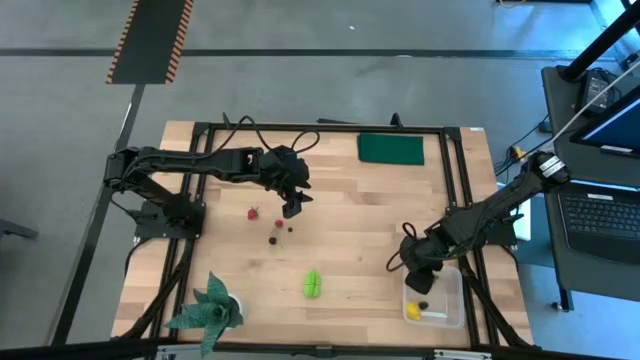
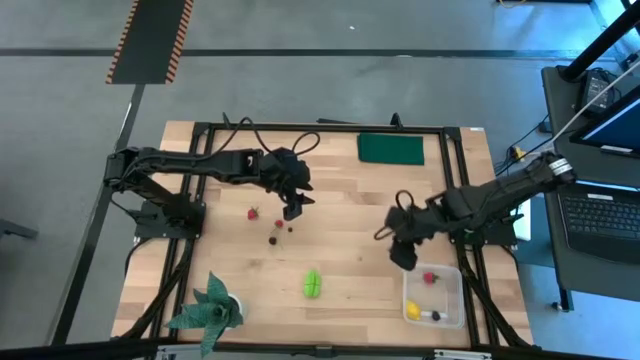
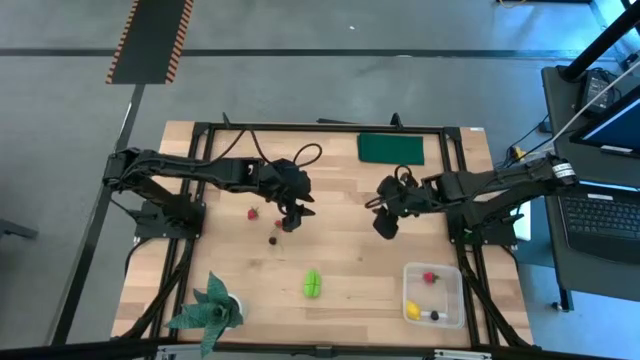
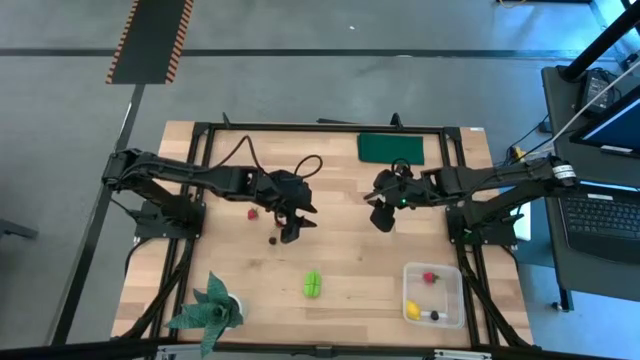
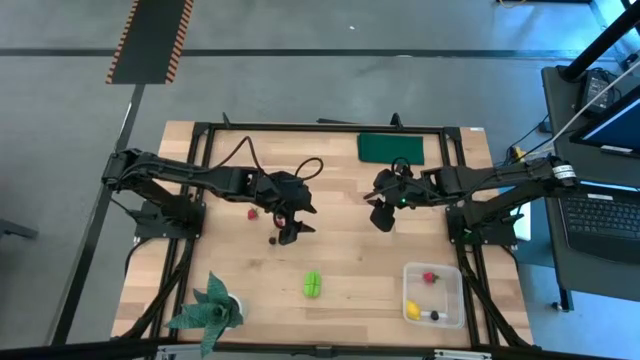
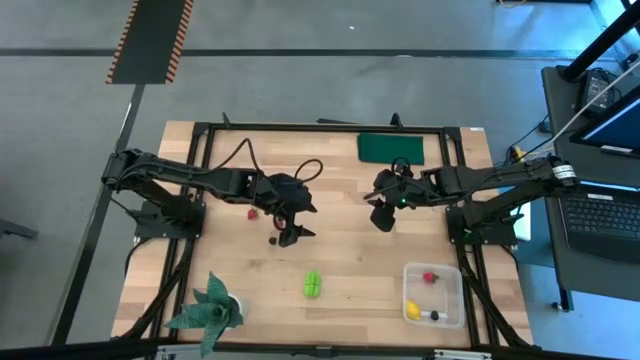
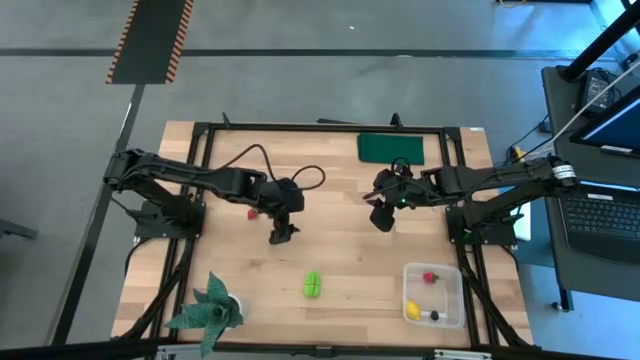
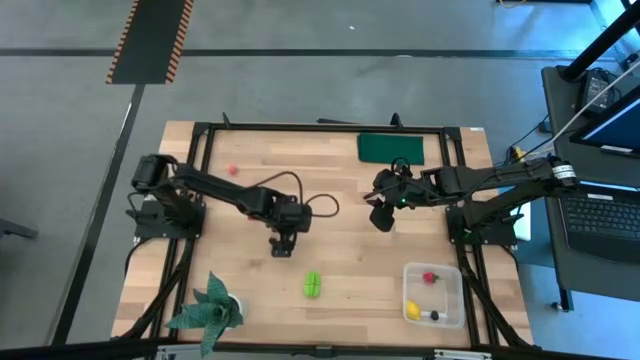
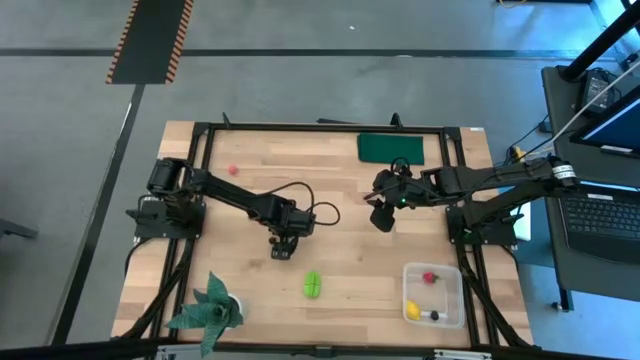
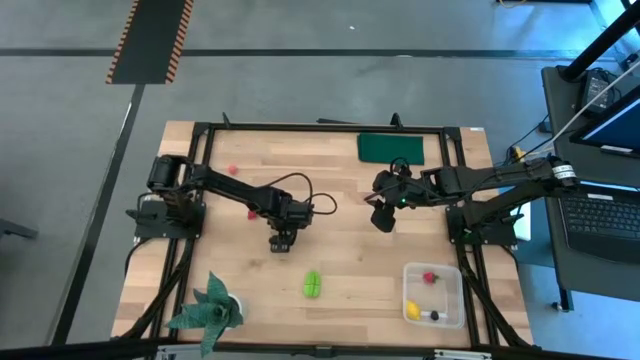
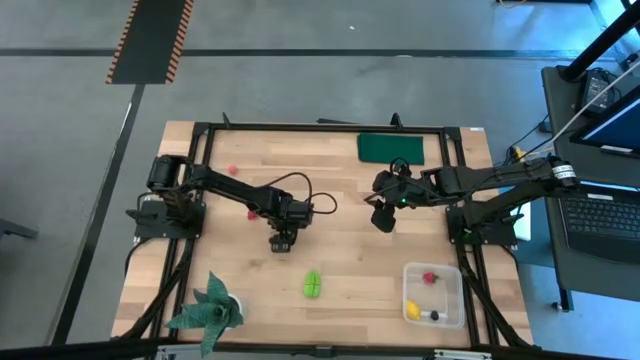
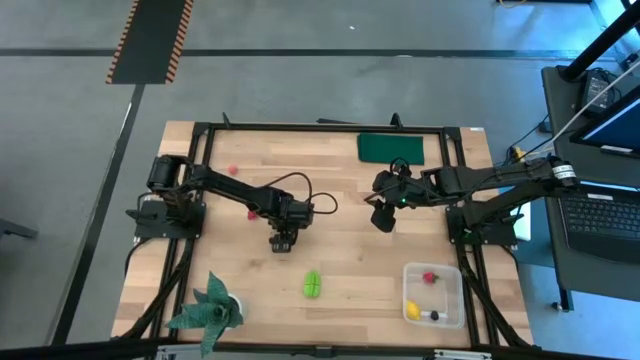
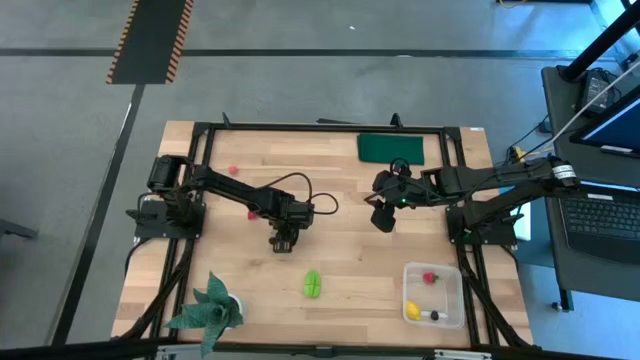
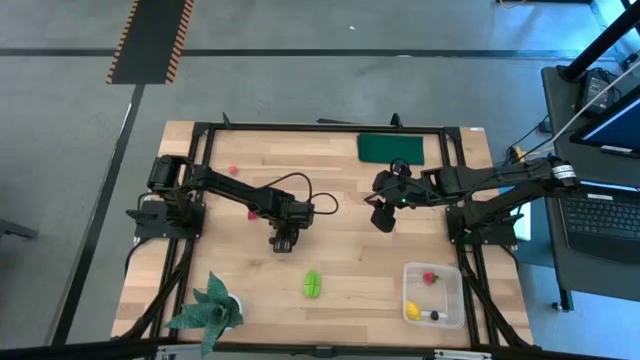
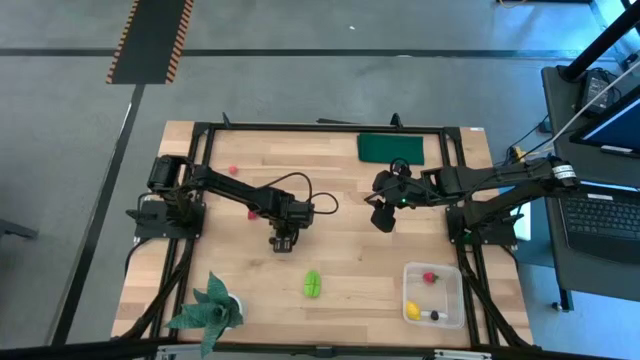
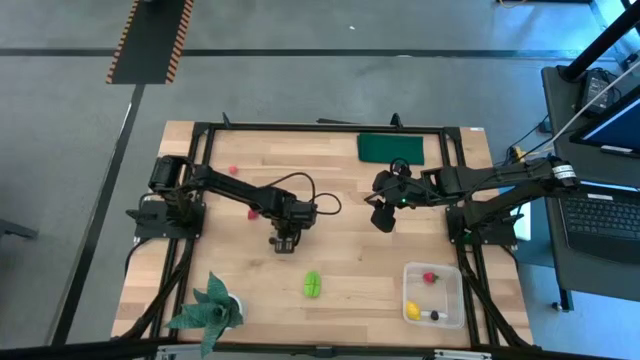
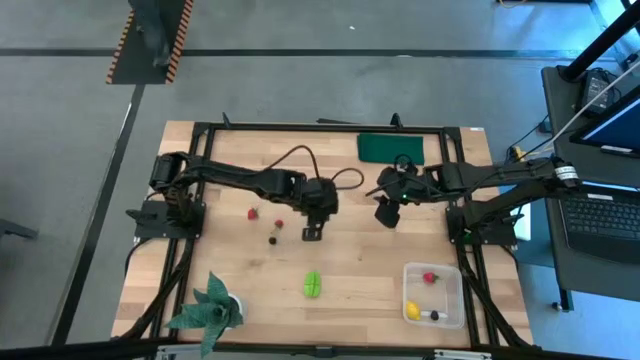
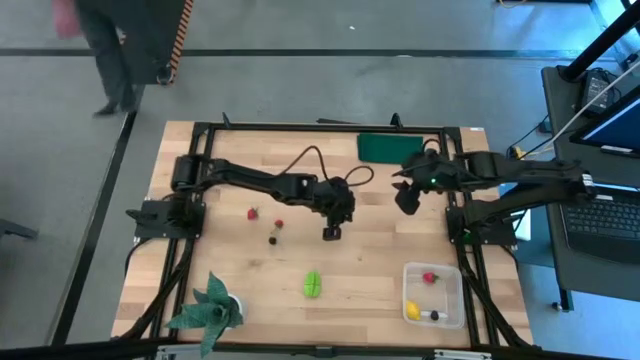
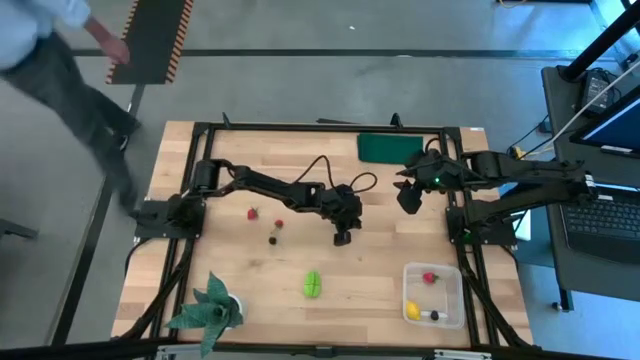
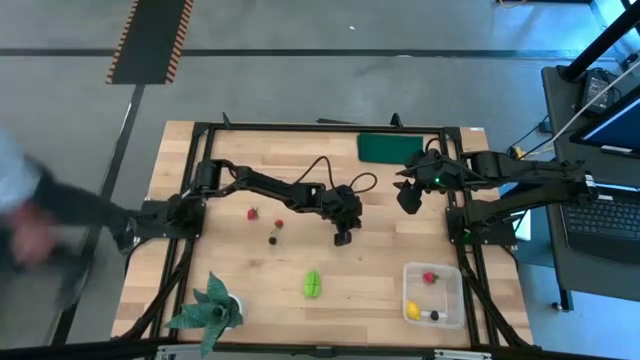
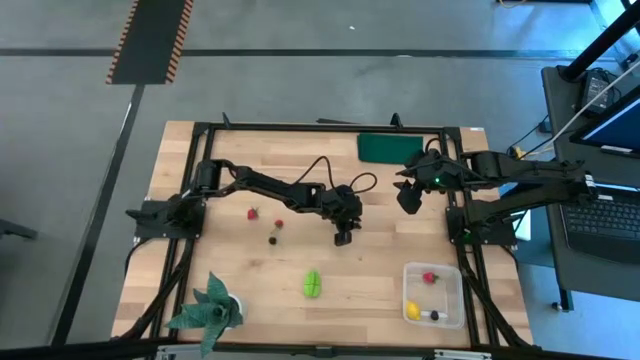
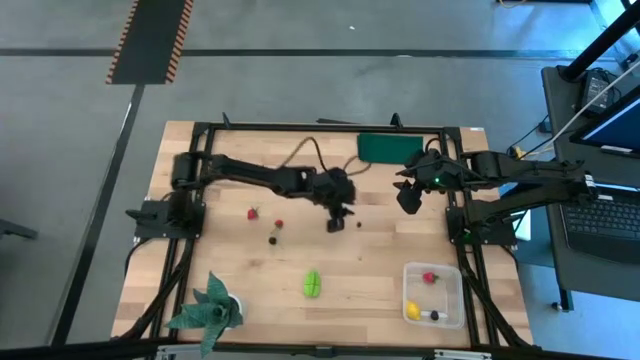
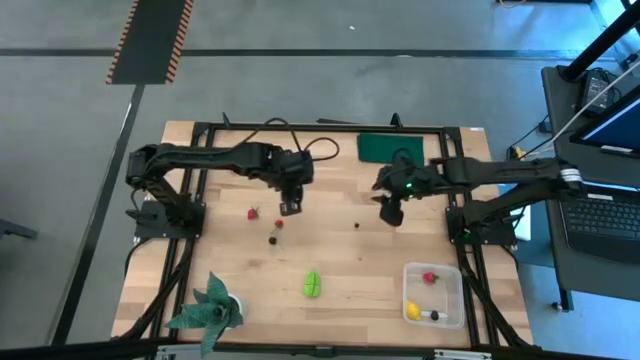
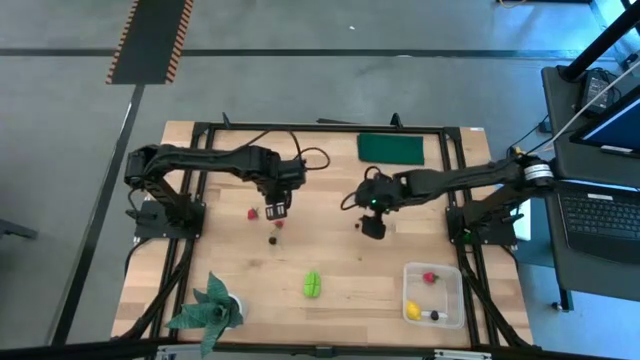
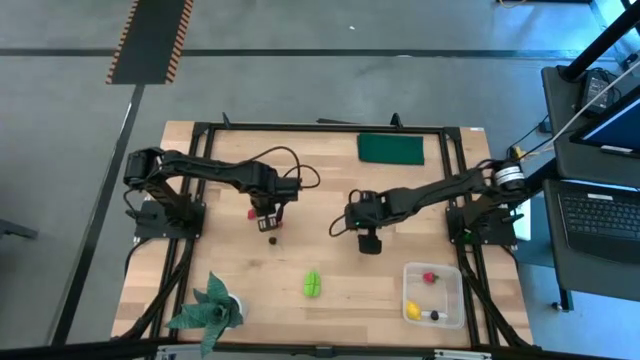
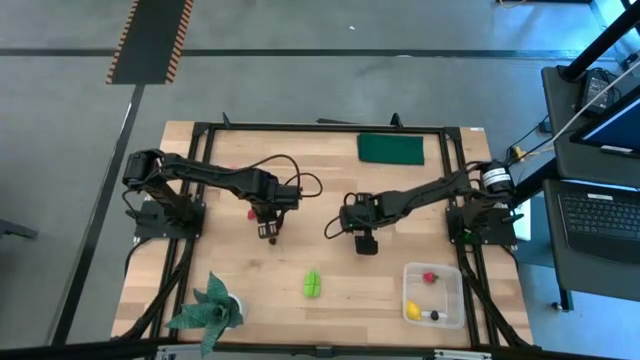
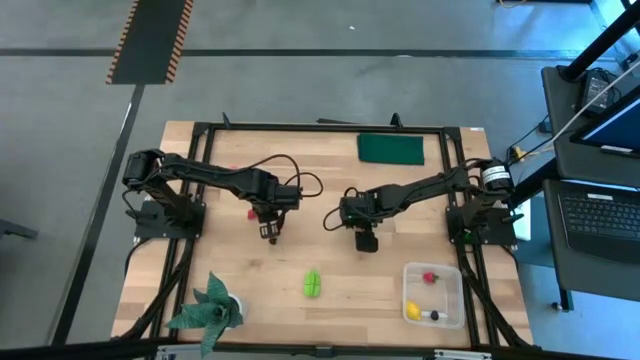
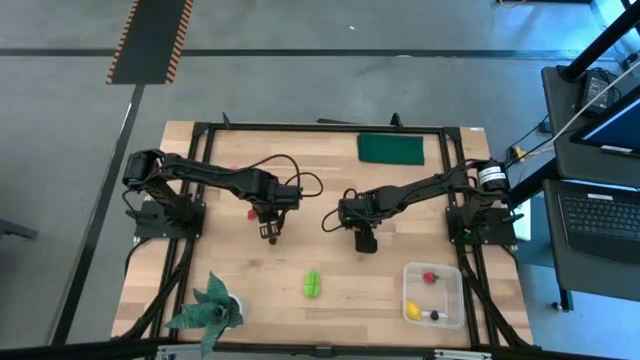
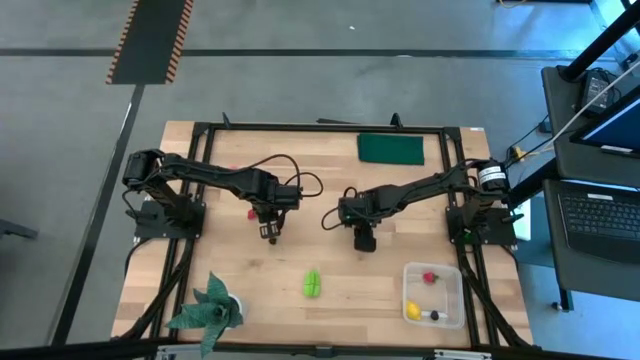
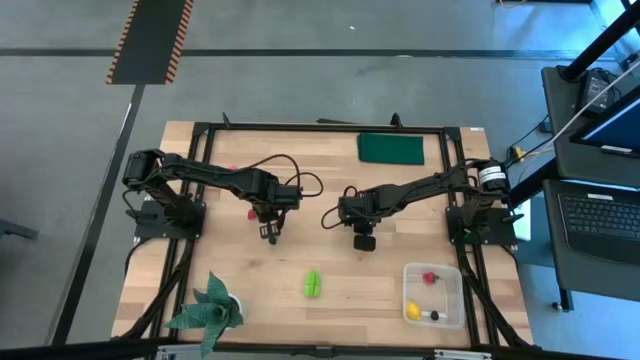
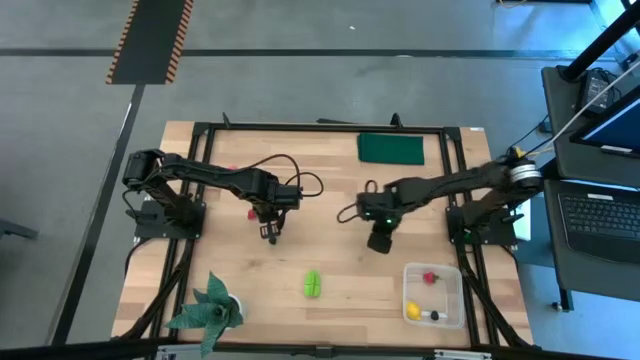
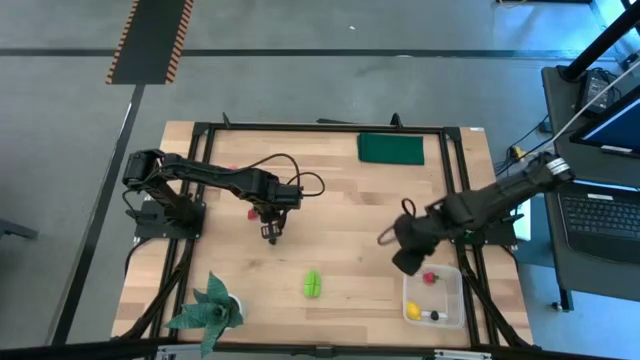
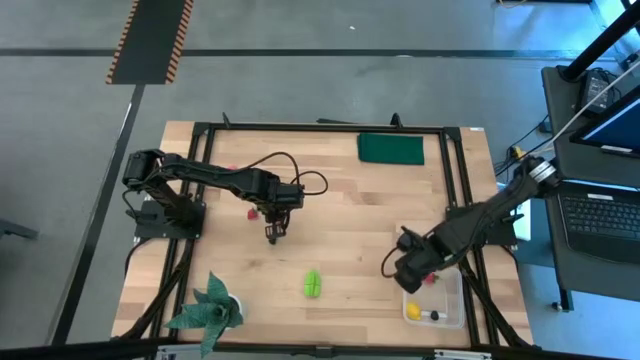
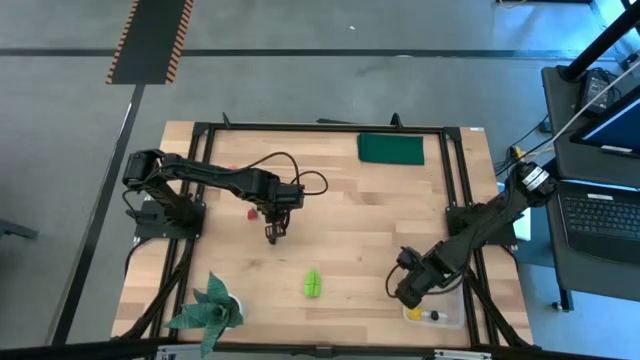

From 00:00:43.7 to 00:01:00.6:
Task: Pick and placing Produce into tupperware
Put the blueberry into the transparent bin

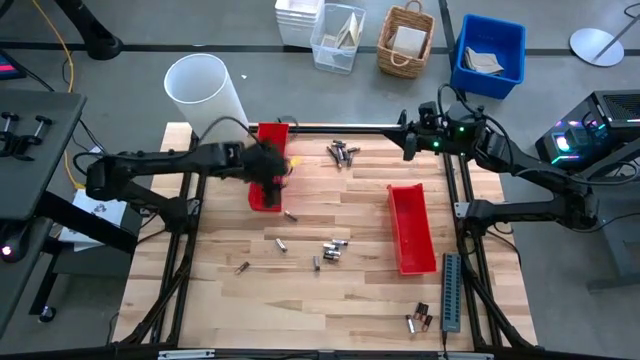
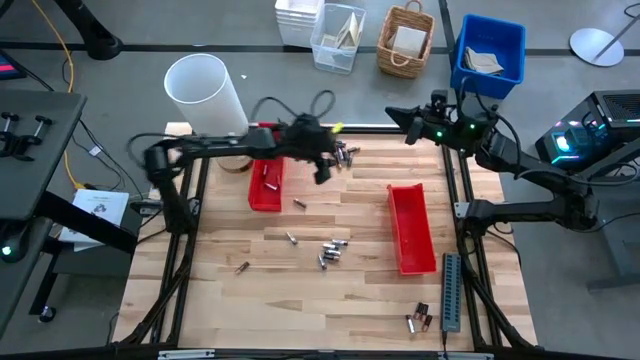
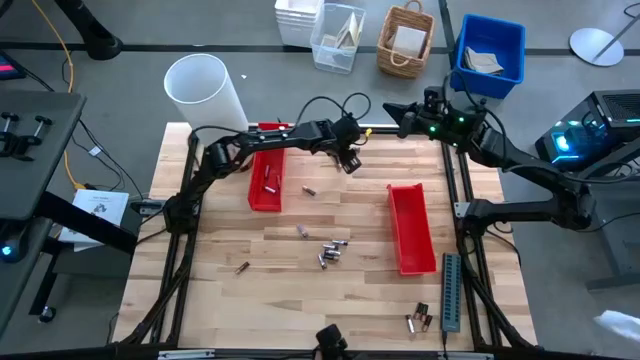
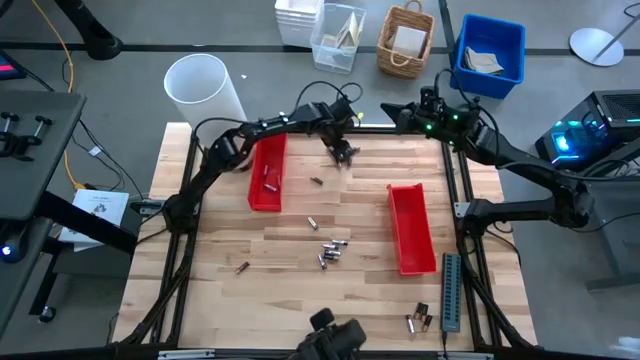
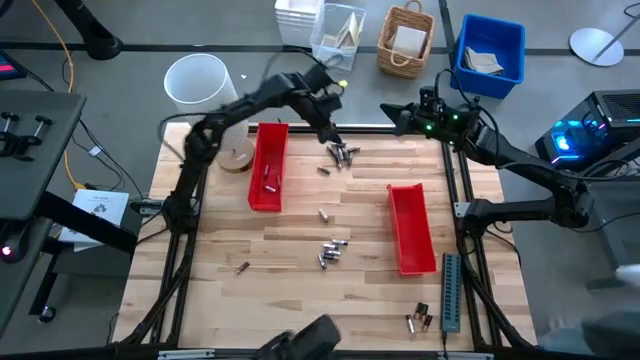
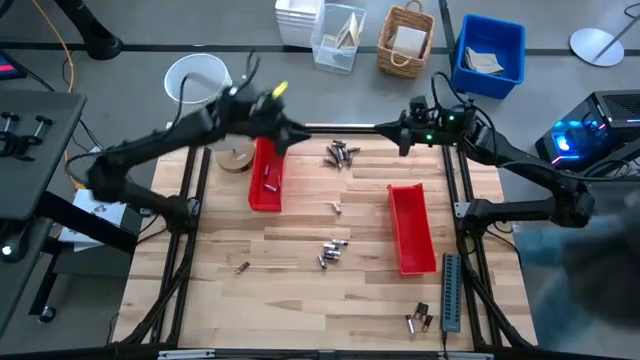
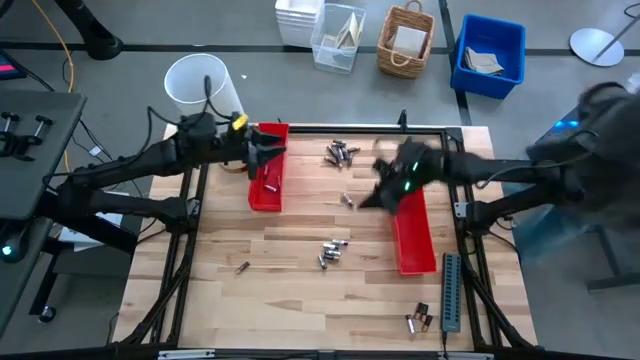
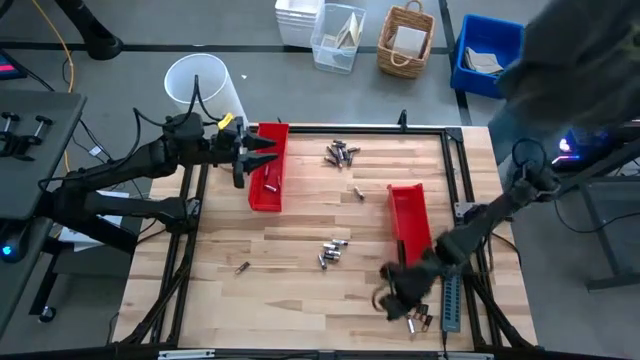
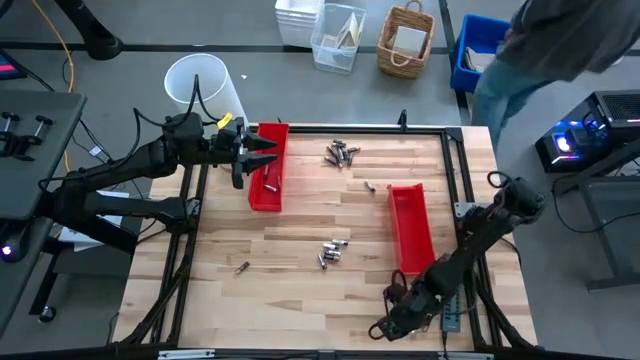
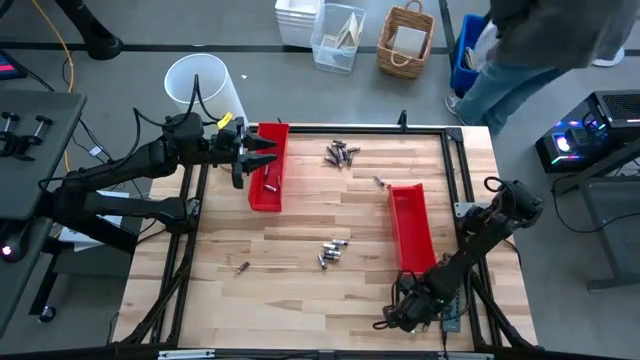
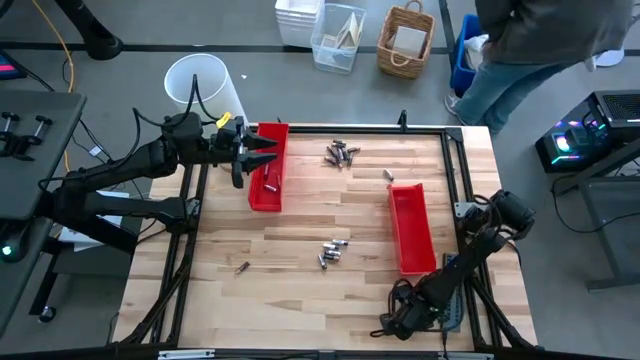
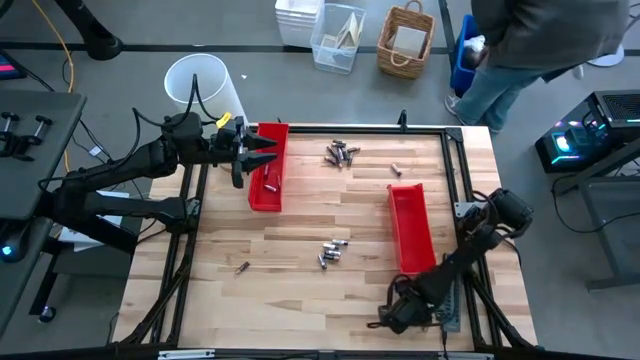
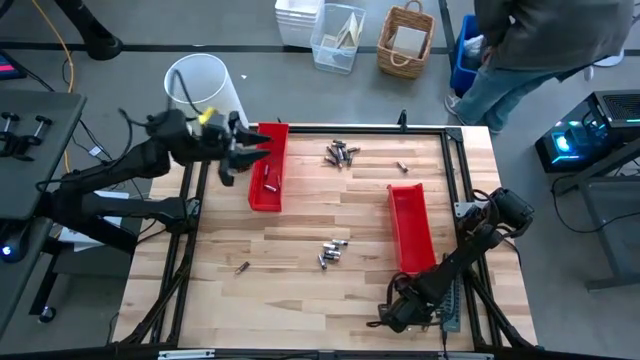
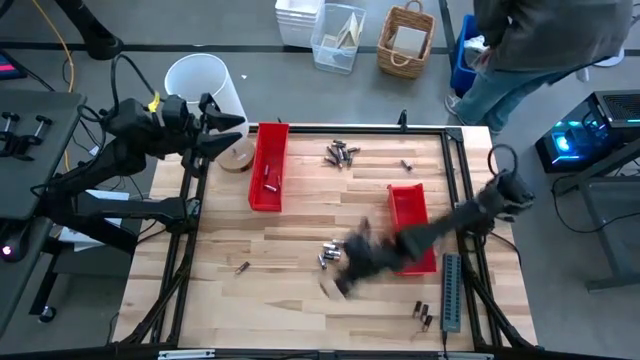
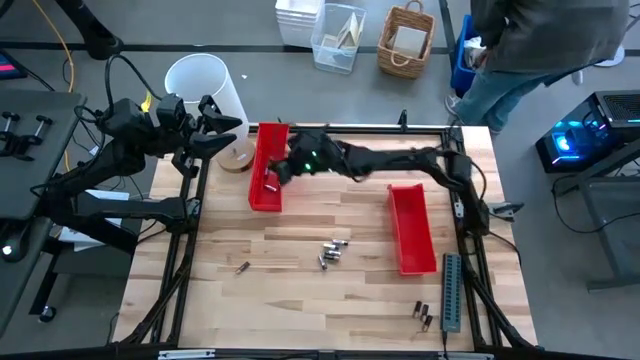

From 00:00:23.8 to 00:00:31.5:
Task: Sort batteries
Put the silver battery into the top red bin
